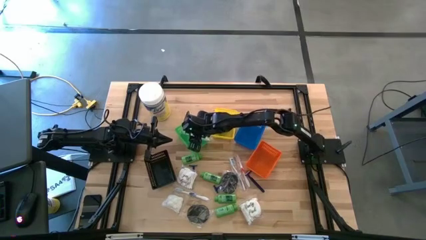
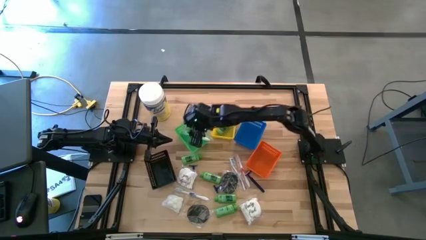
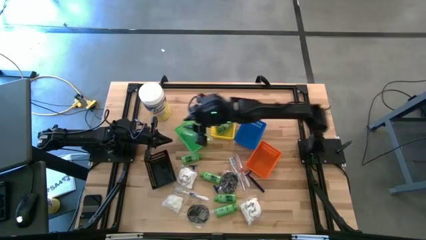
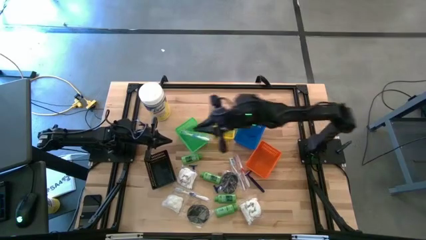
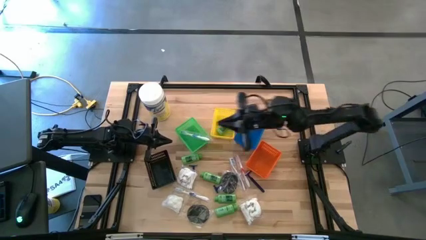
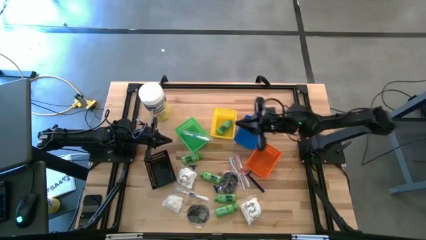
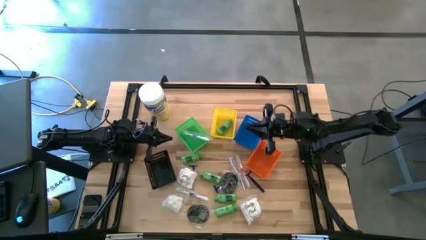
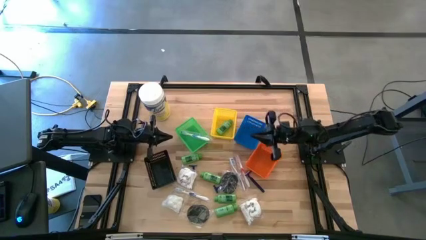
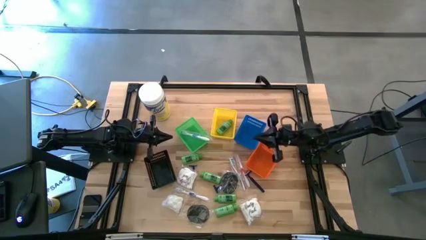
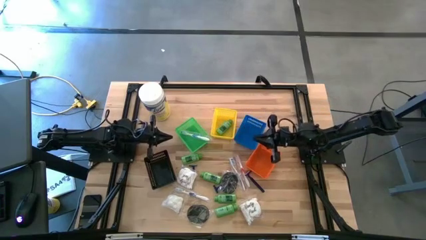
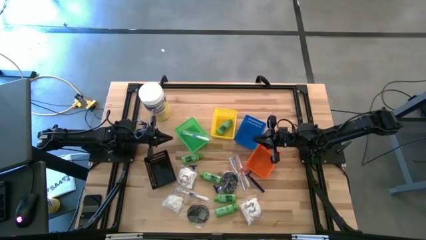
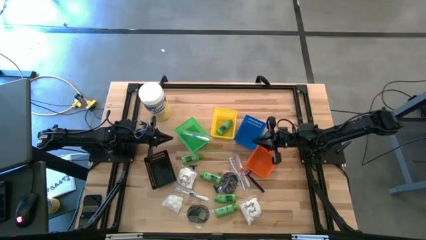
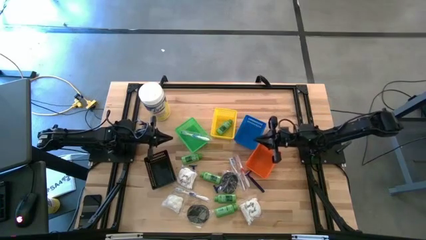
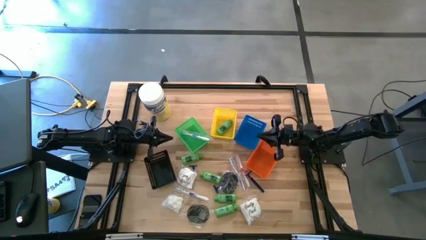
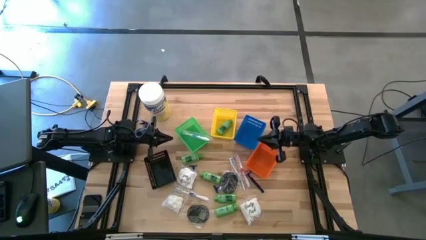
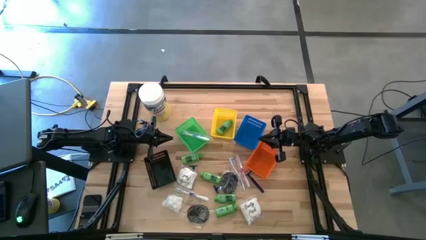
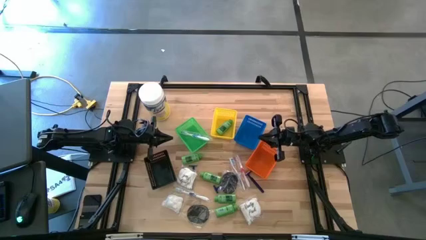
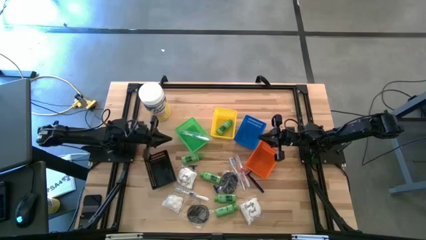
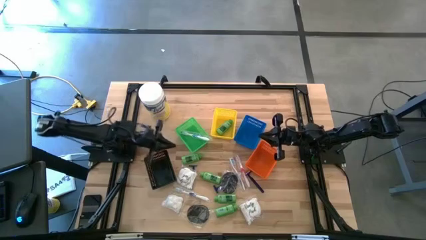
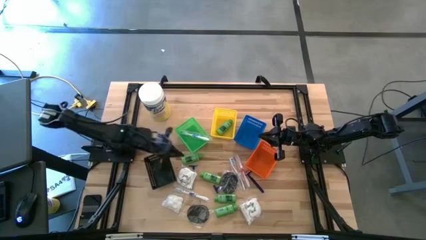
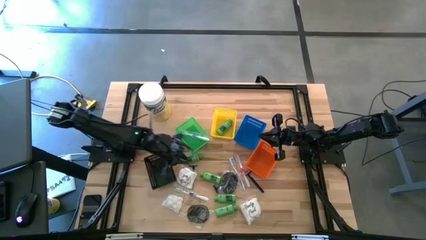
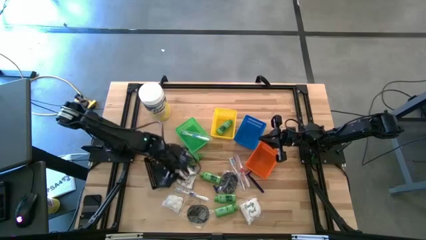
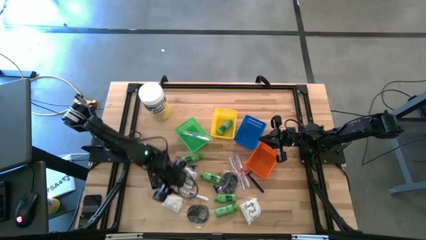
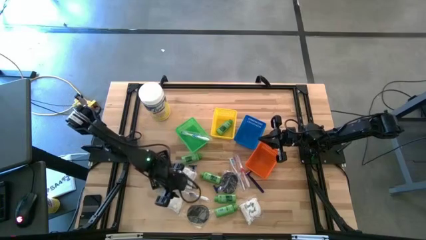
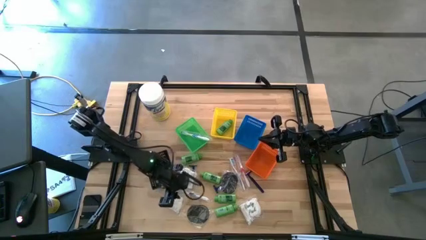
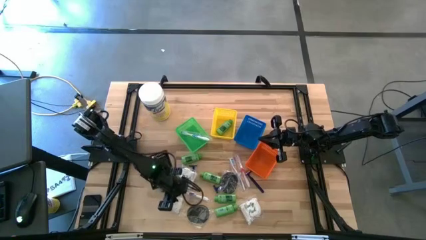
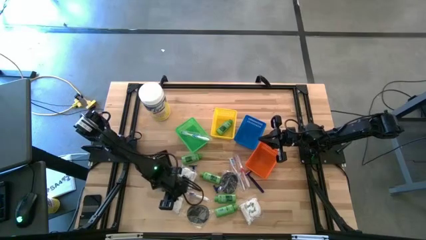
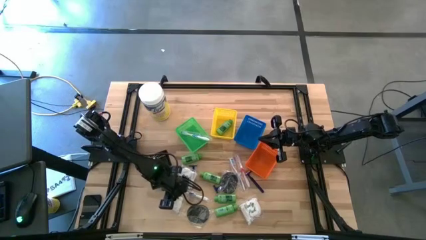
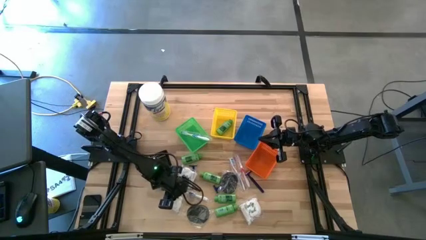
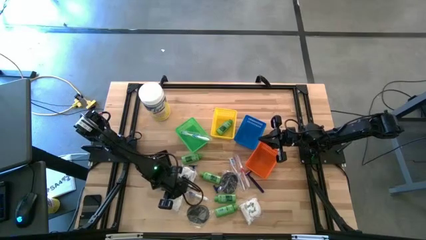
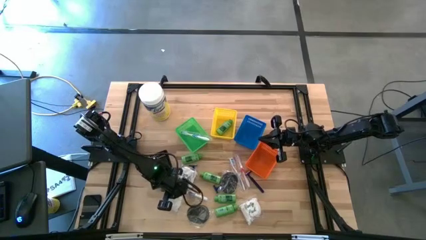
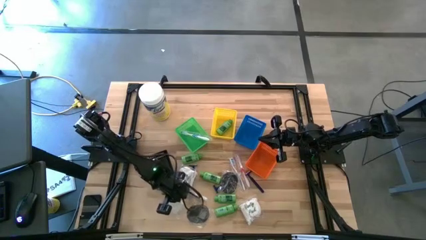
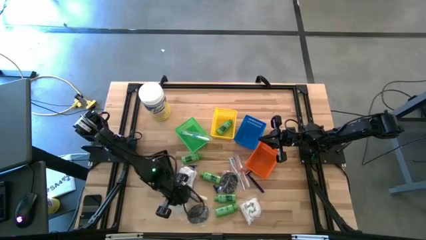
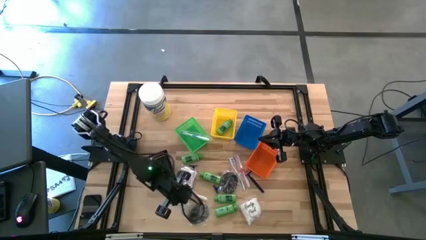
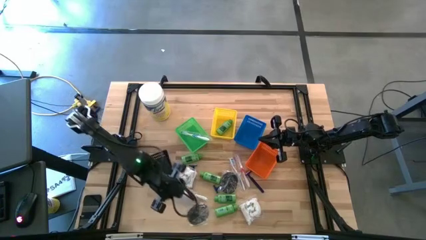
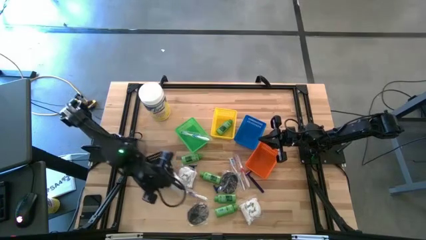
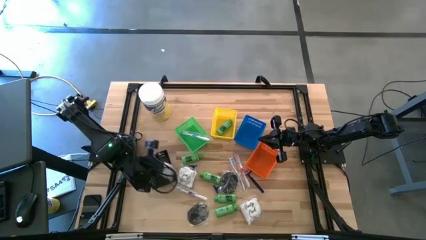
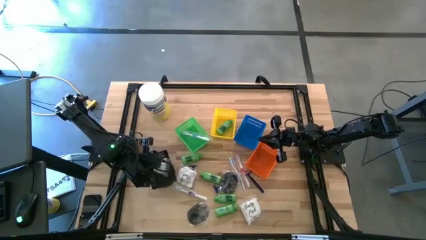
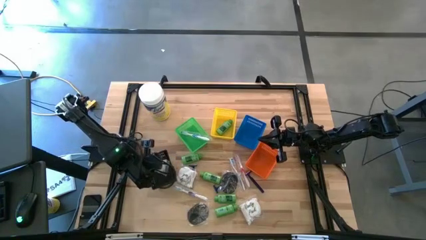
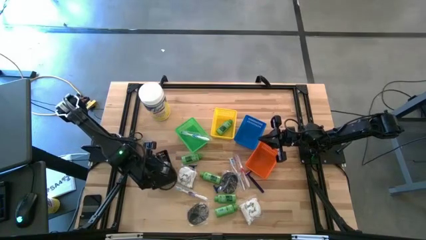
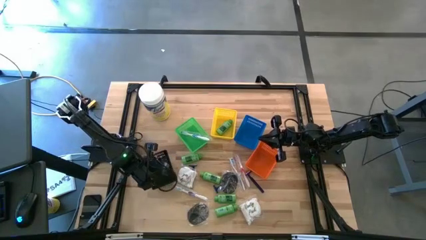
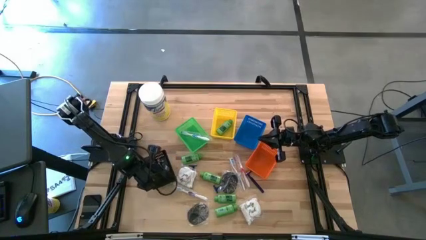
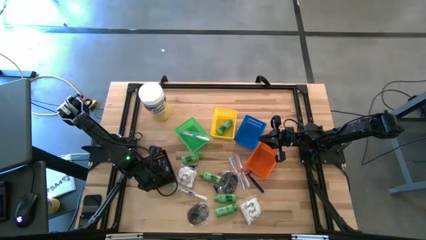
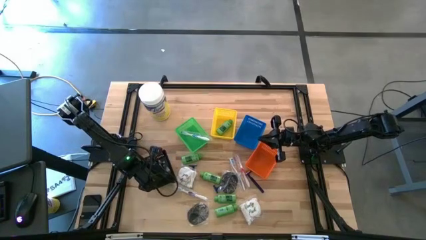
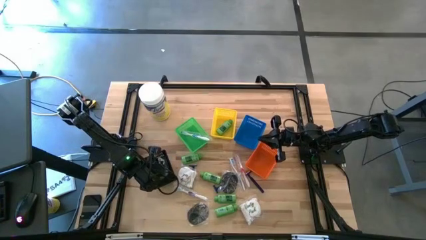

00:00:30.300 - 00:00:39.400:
Task: Pick & Place Travel size toiletries
Put the cotton pack into the black bin

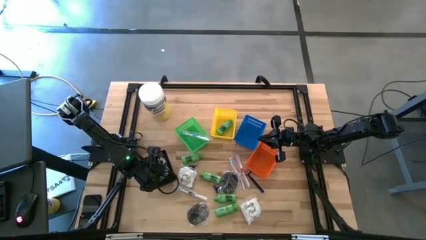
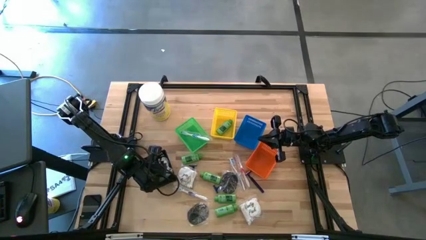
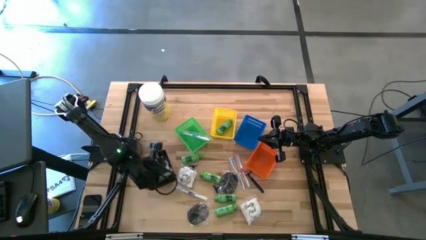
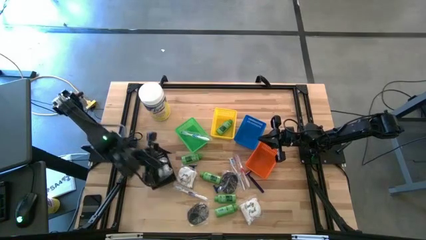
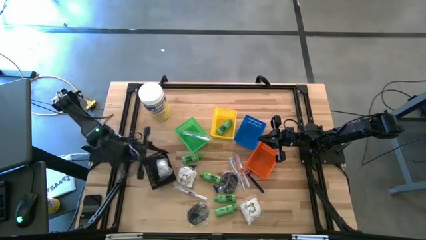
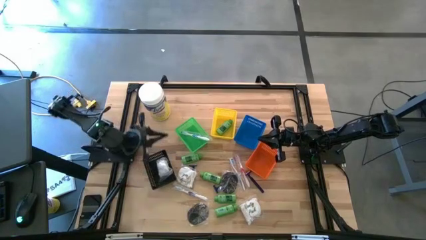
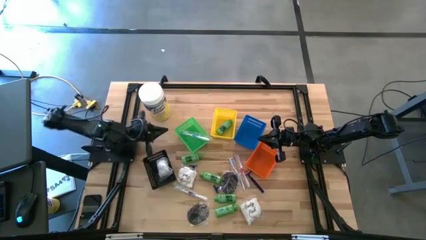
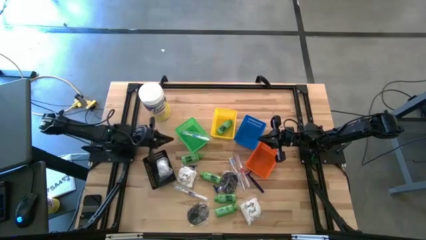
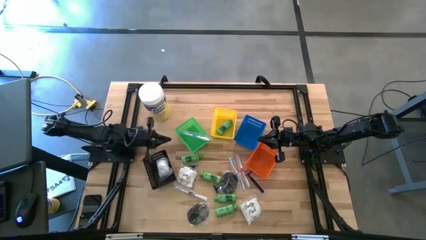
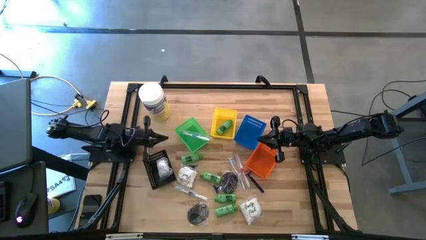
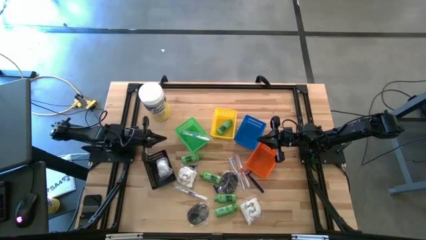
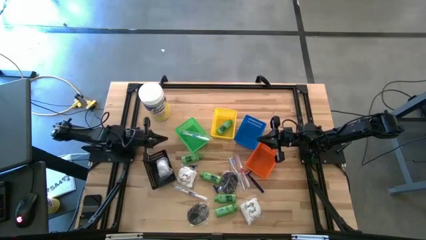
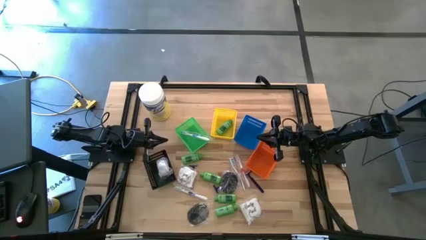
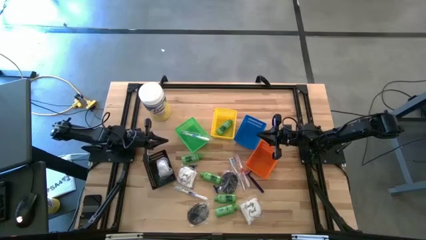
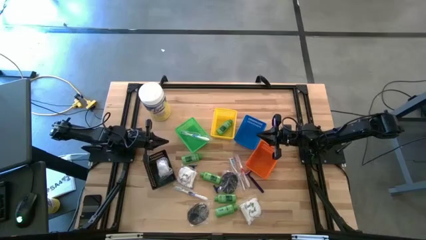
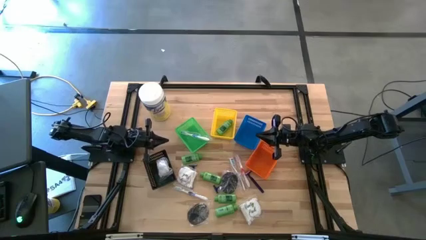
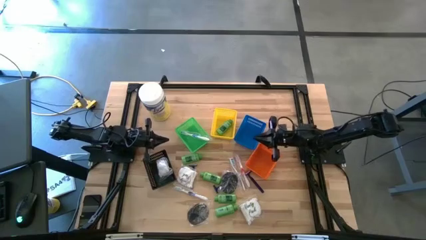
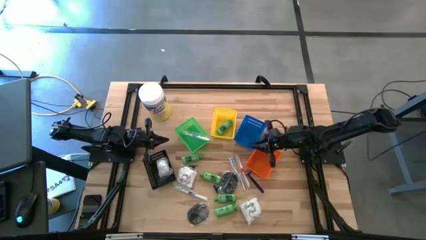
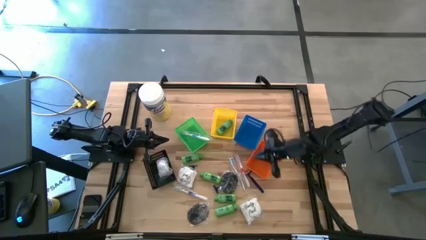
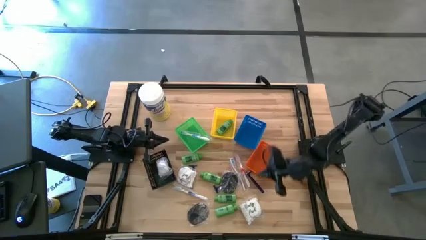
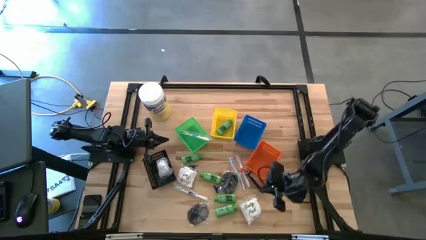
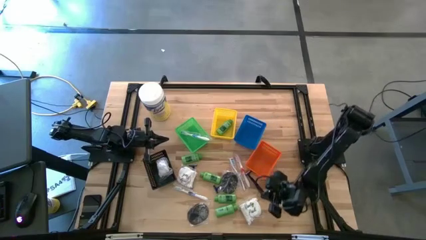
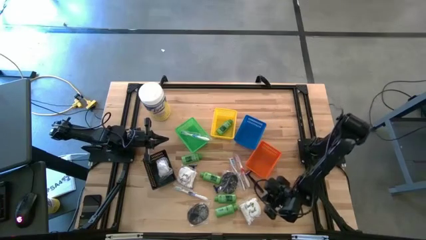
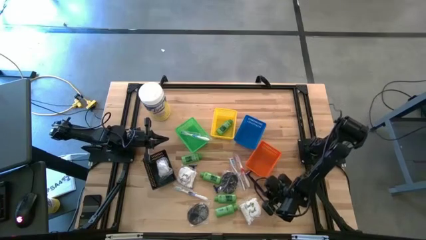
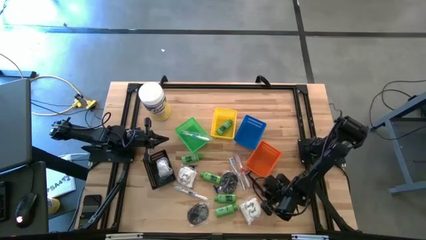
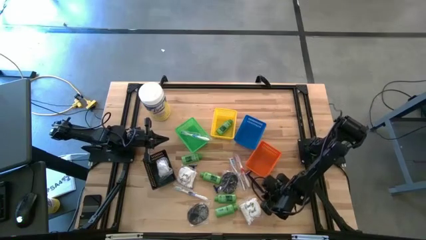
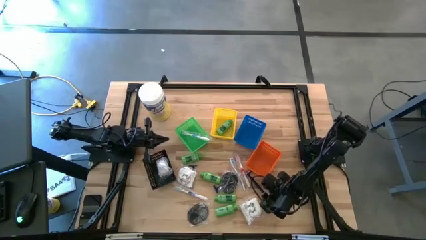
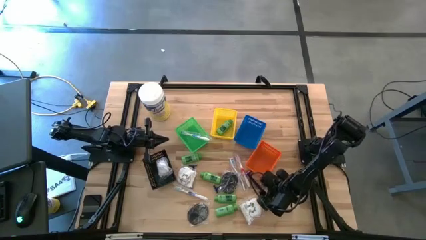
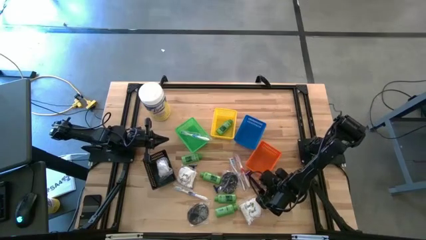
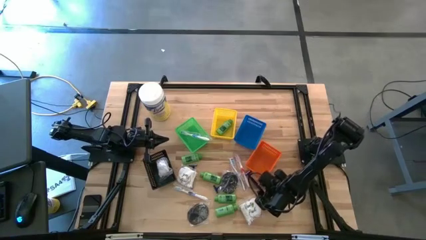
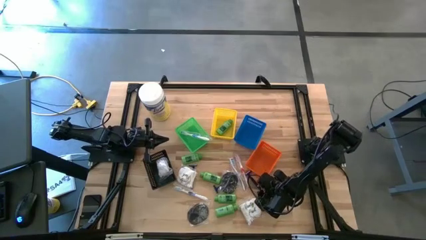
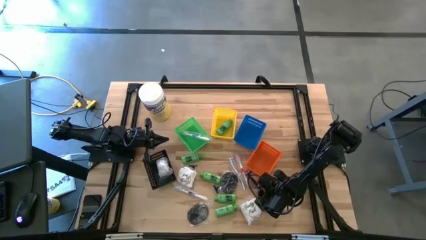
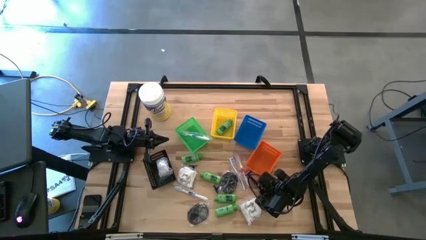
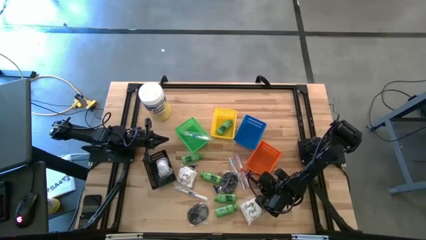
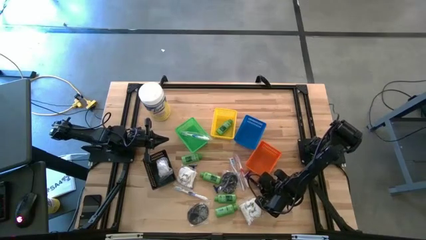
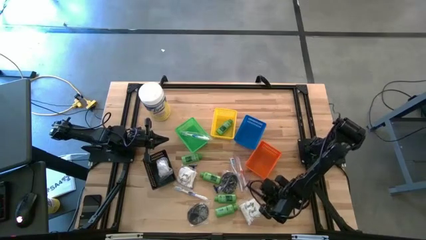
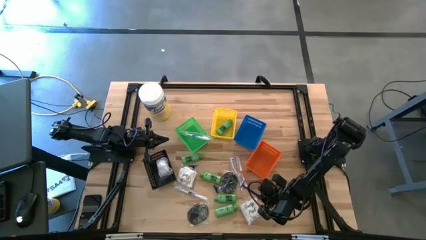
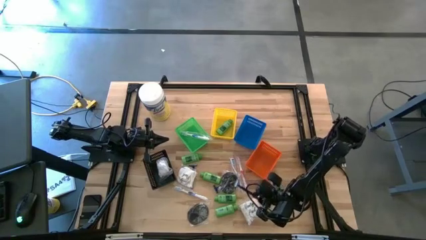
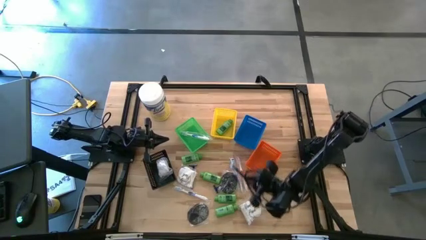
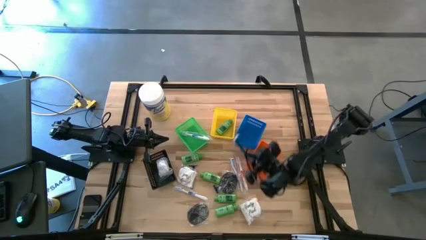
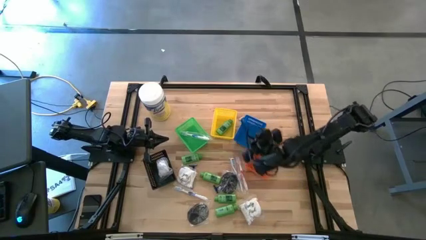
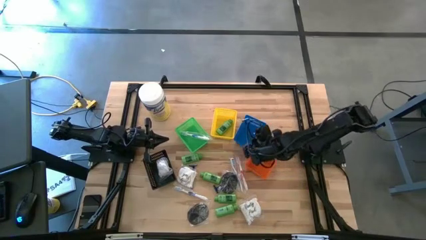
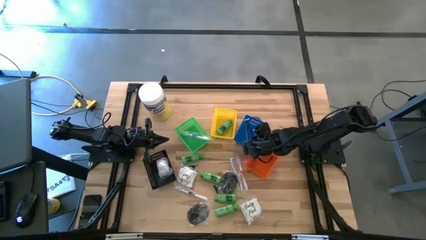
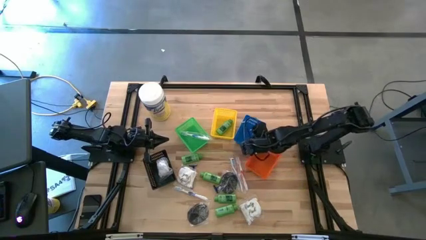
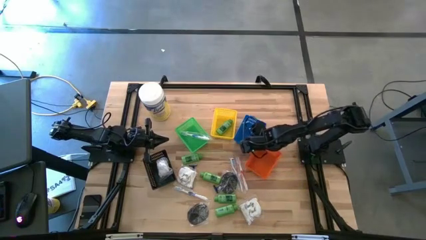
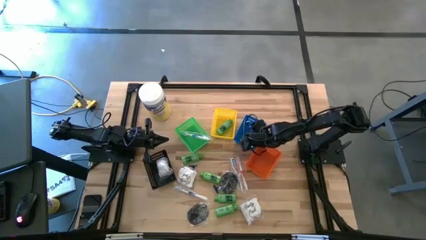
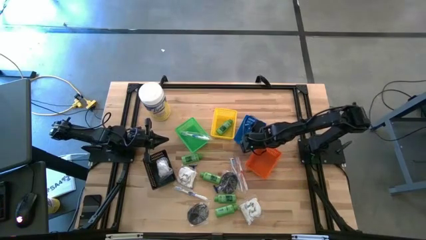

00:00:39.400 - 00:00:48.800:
Put the razor into the blue bin
